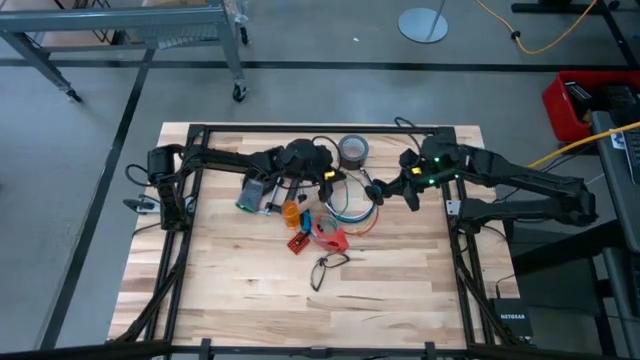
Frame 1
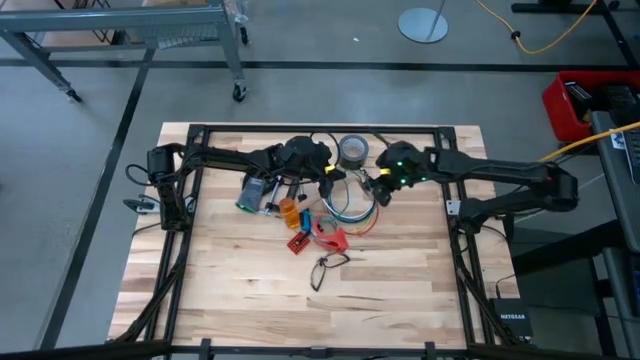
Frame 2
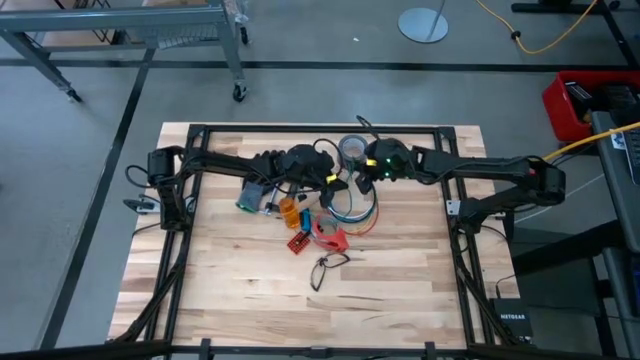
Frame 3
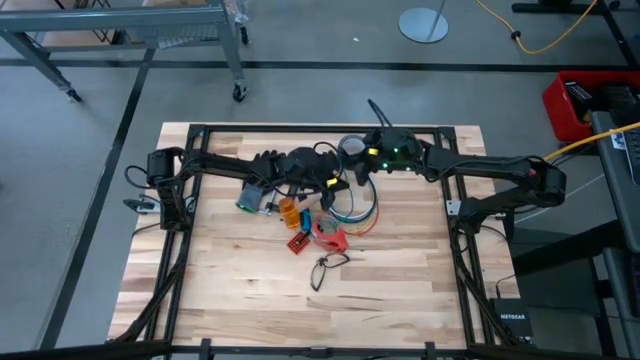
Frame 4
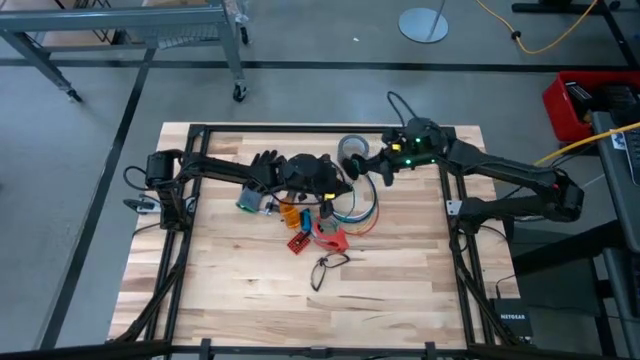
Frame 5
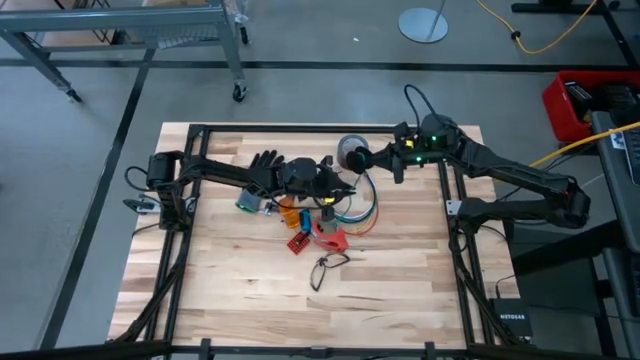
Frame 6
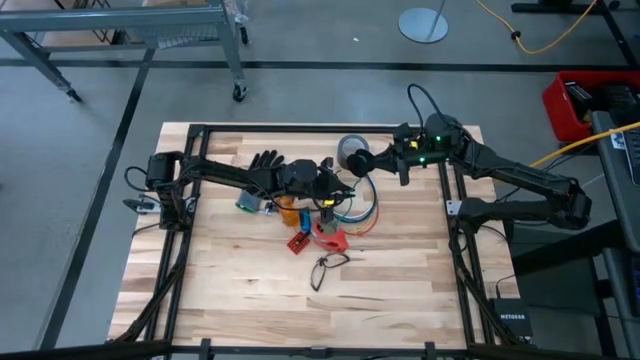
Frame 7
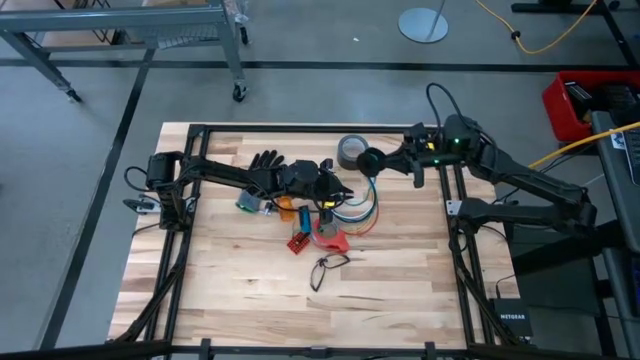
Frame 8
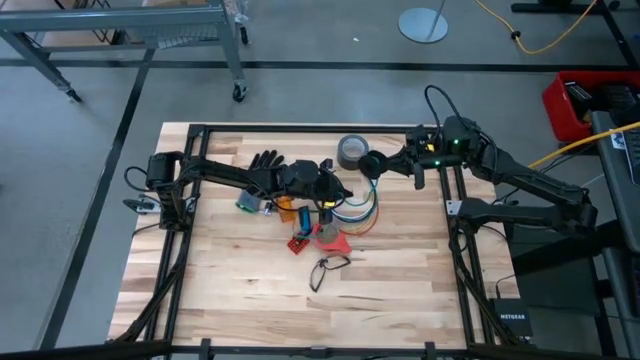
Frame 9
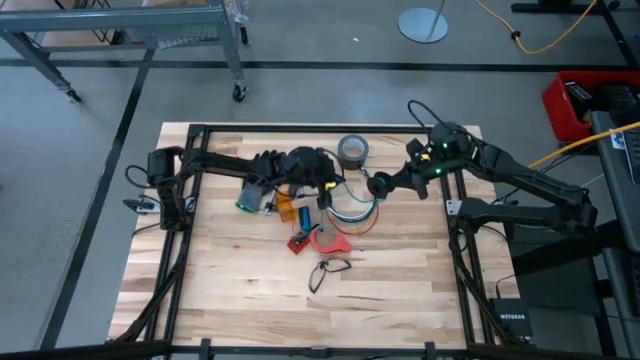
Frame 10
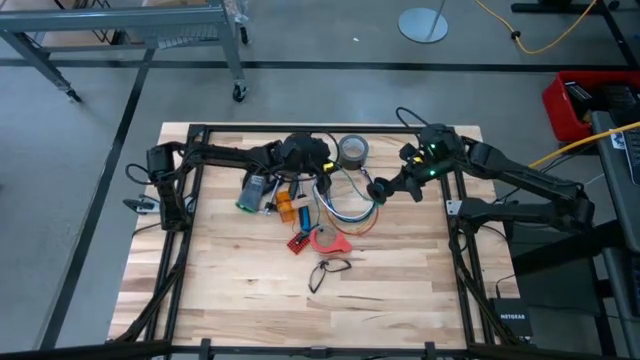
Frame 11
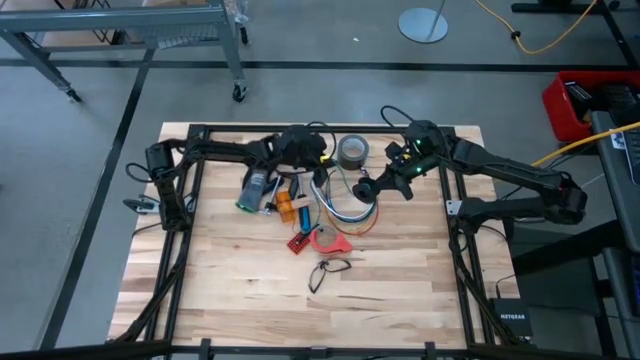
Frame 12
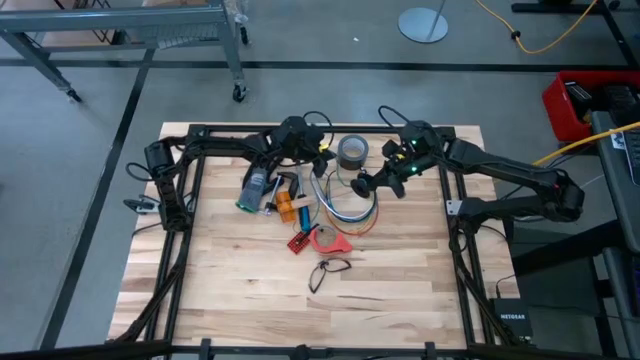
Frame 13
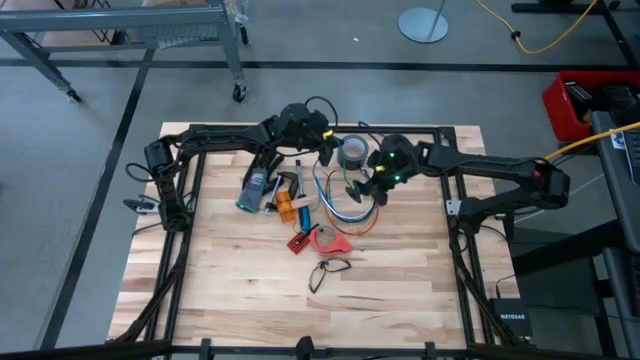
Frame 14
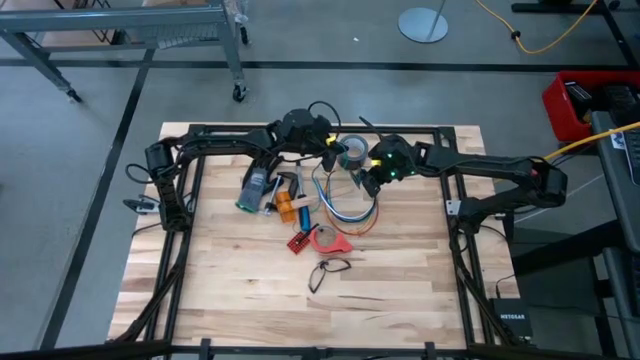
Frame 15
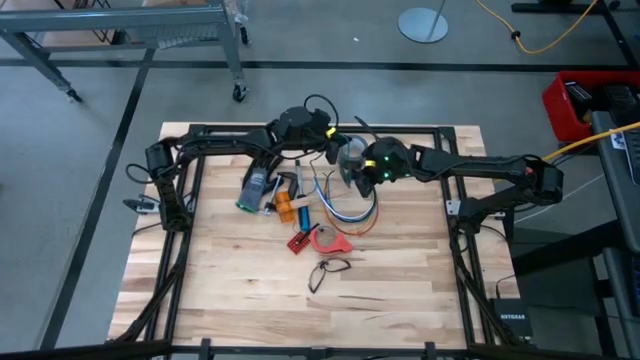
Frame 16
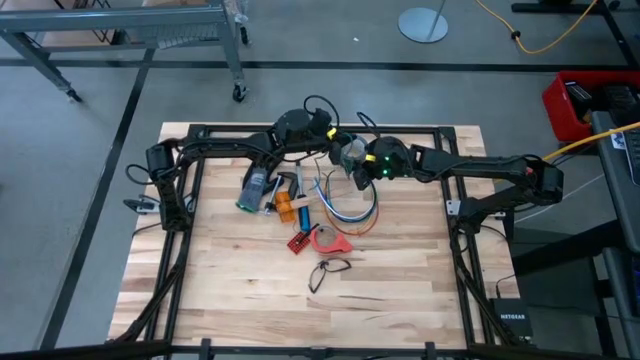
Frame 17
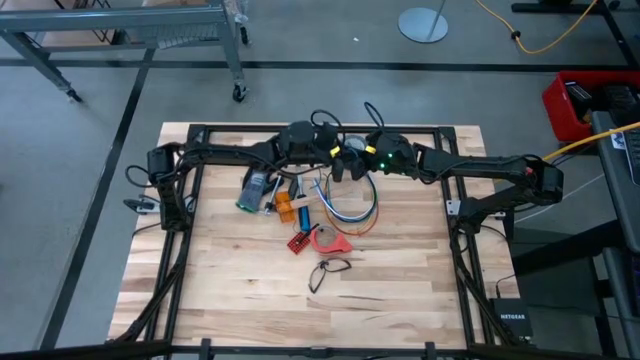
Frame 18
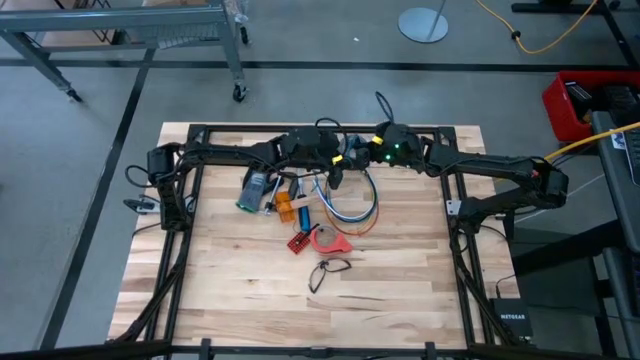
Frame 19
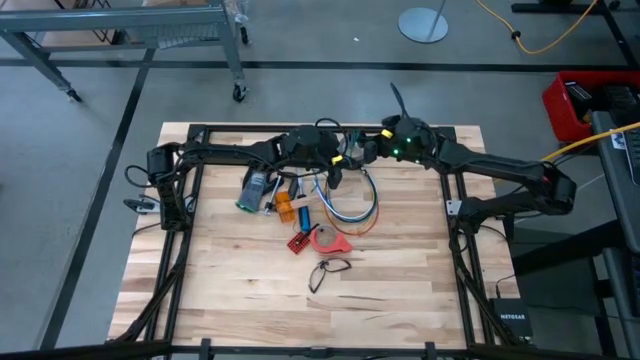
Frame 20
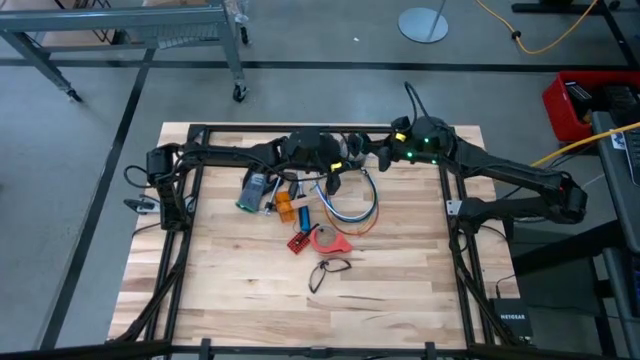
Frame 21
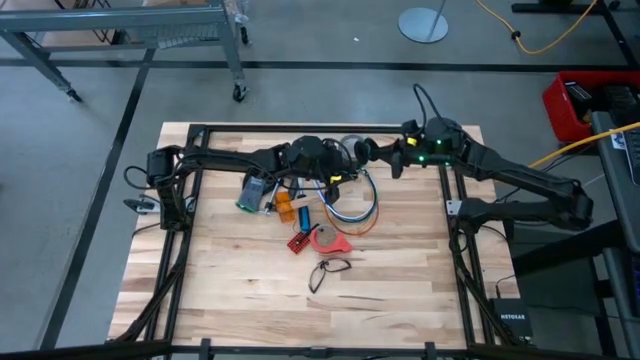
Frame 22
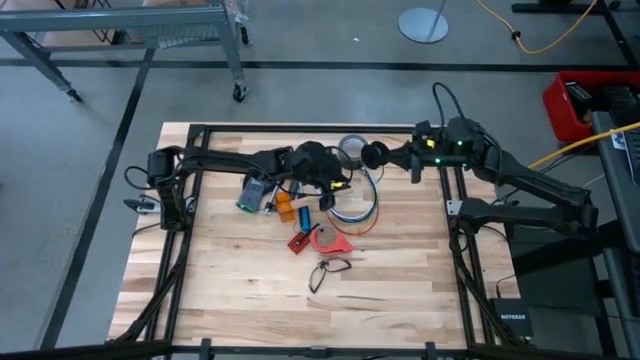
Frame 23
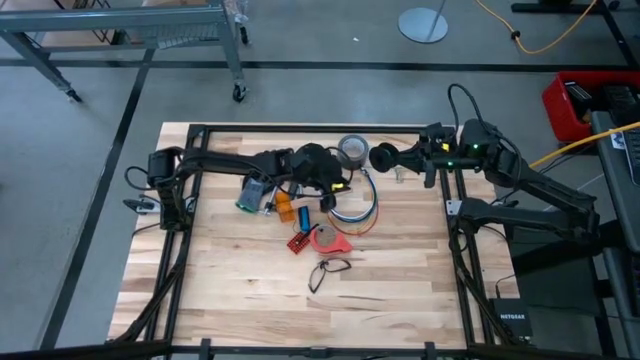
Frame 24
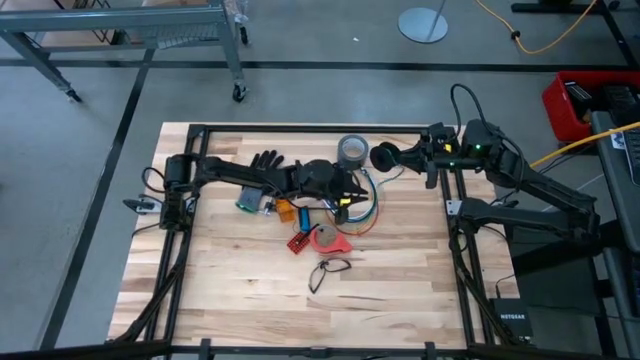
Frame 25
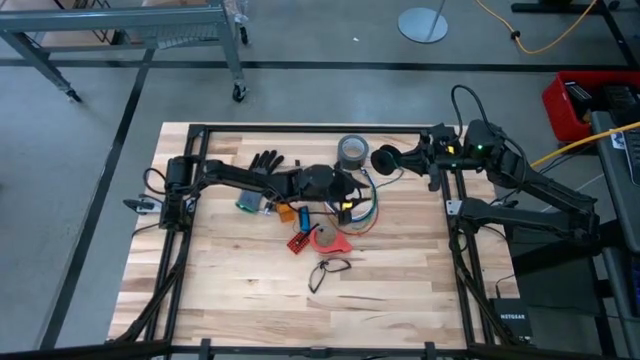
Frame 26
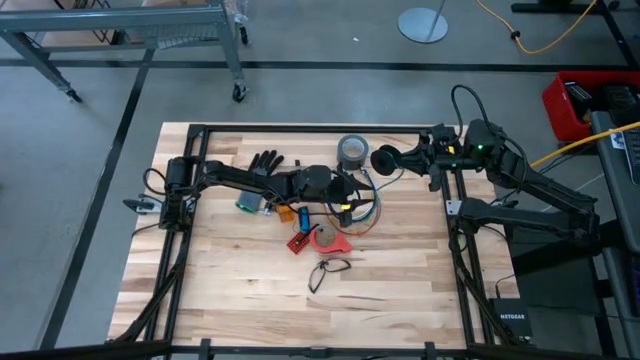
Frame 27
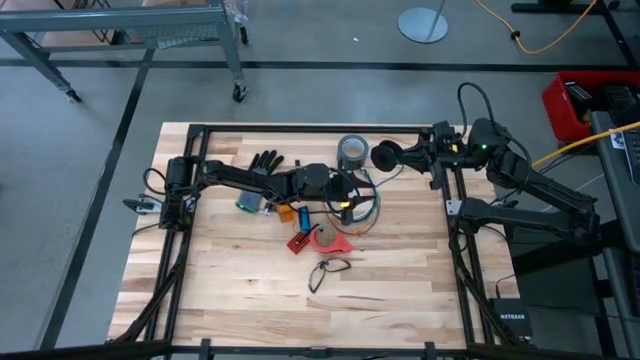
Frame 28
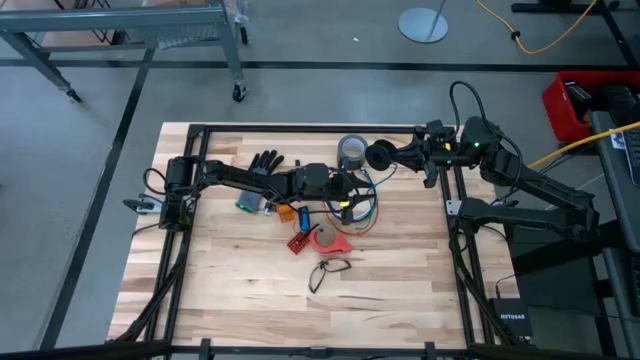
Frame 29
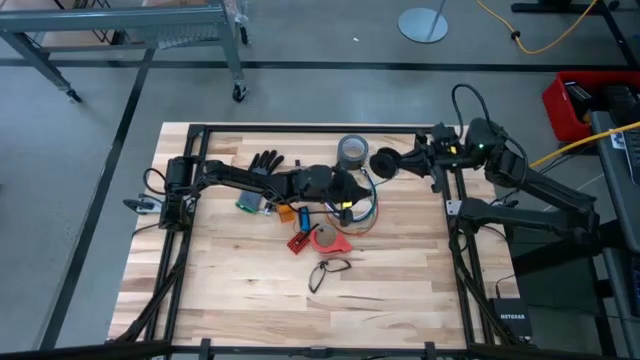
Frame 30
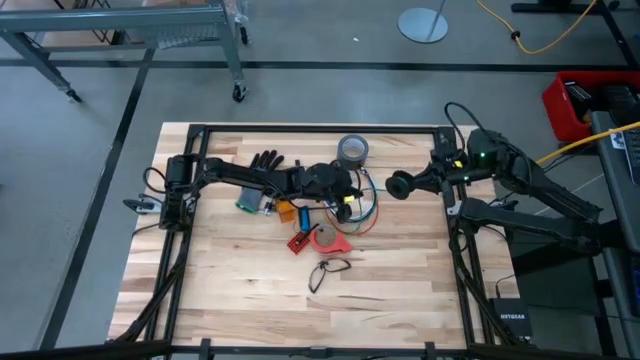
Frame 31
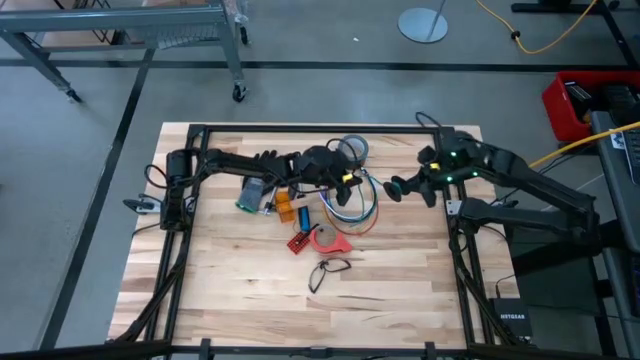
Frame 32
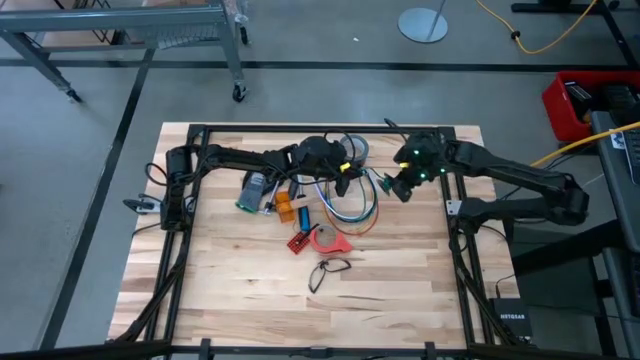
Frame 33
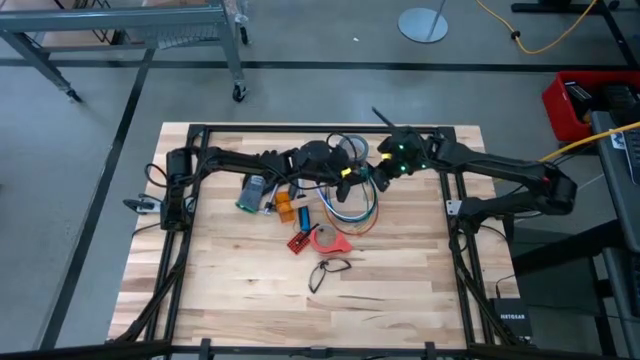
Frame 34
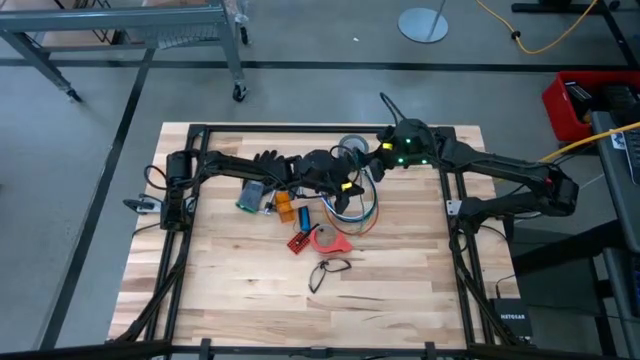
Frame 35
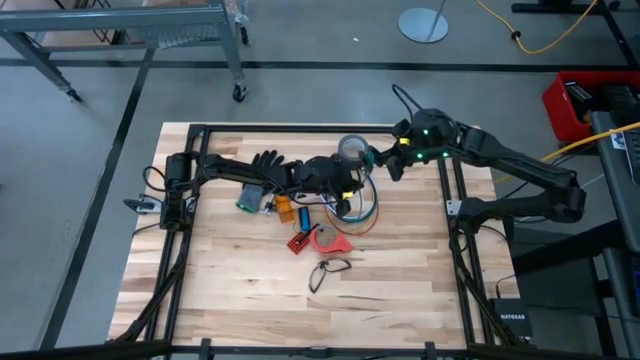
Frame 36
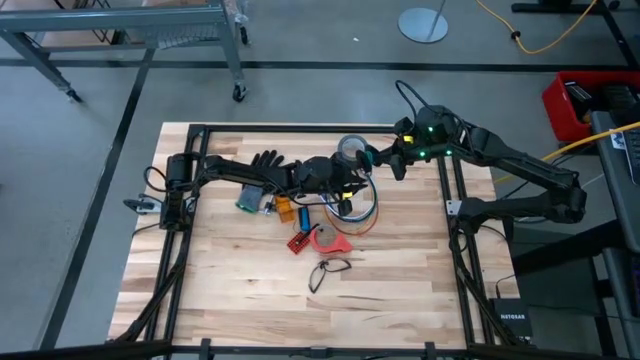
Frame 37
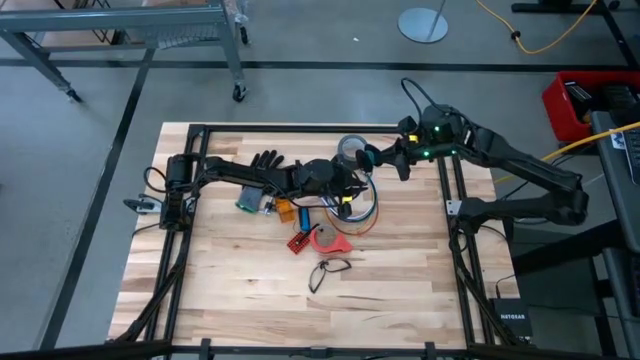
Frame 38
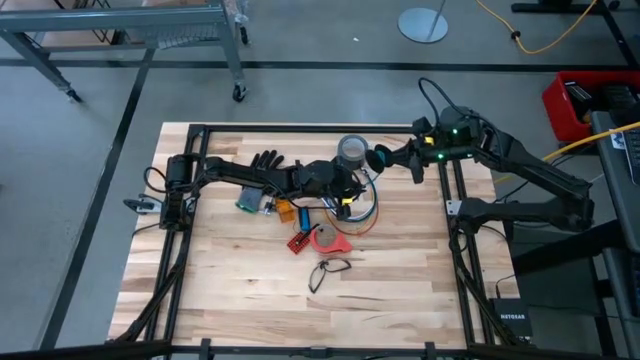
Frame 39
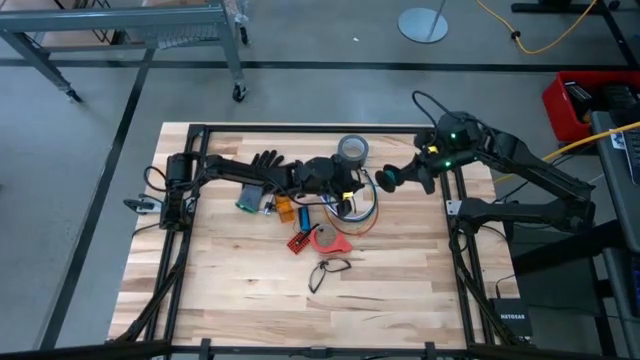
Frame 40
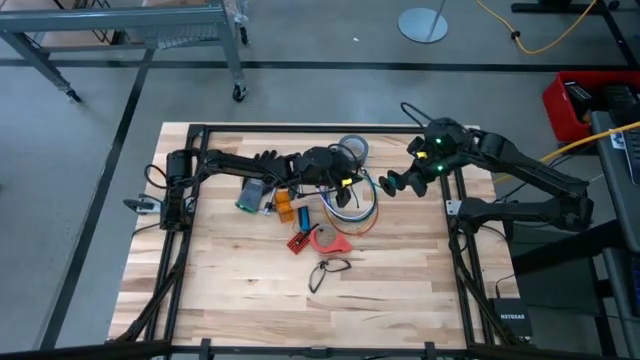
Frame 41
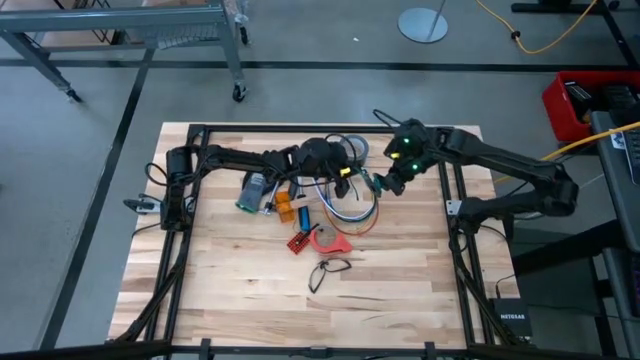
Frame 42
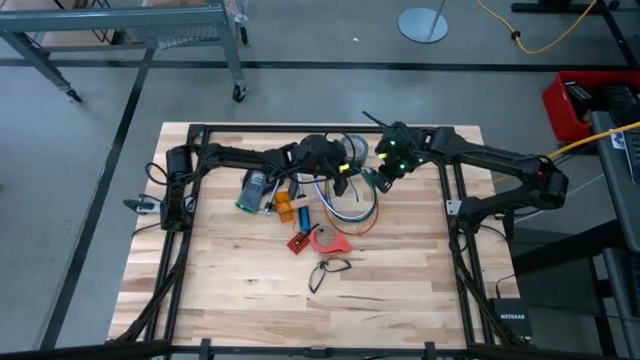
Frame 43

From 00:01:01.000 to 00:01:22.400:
Task: Coil cords
Coil the green wire on the spool
